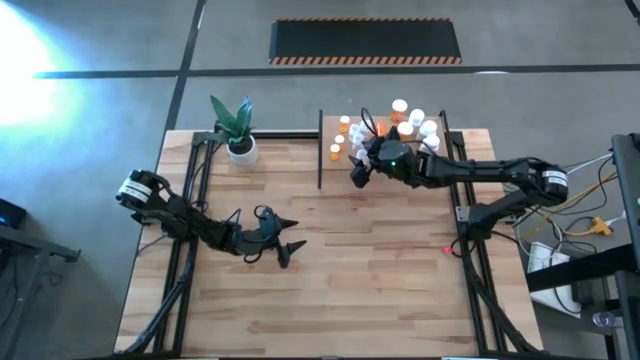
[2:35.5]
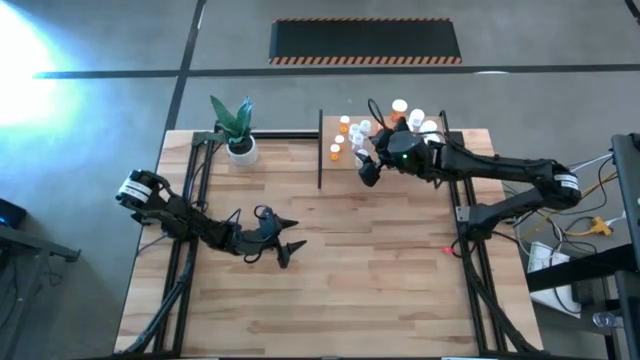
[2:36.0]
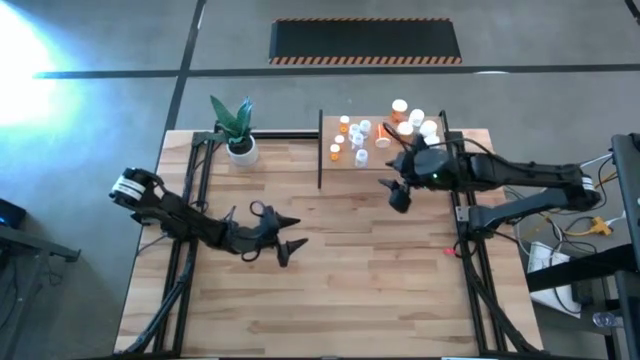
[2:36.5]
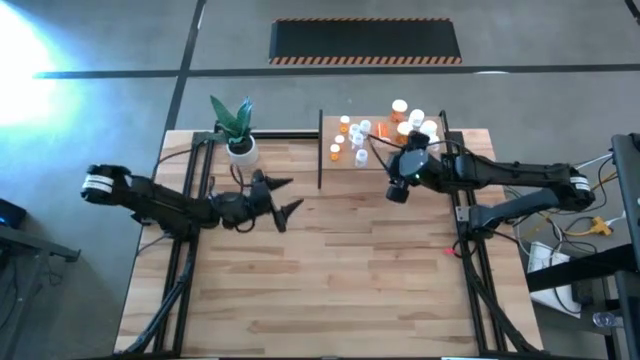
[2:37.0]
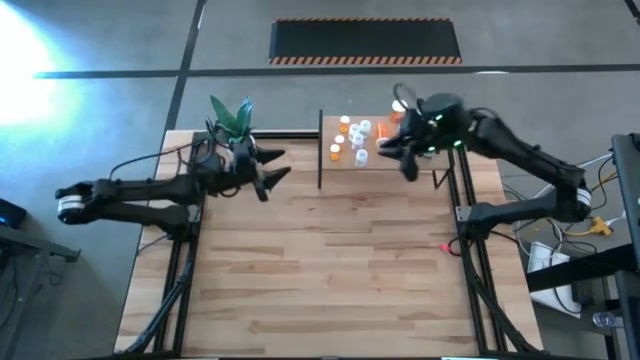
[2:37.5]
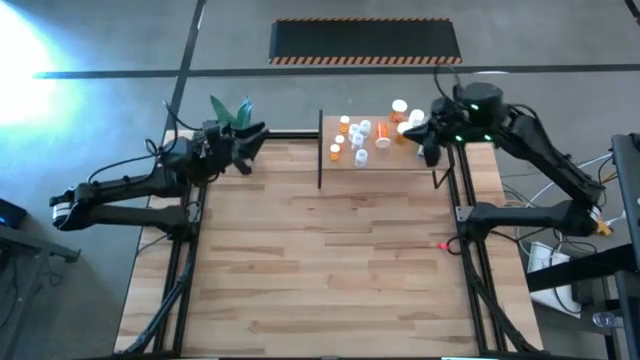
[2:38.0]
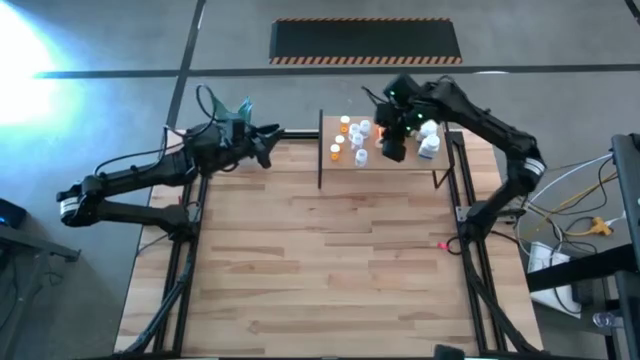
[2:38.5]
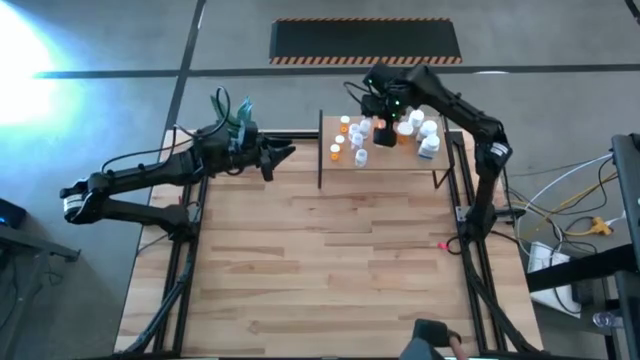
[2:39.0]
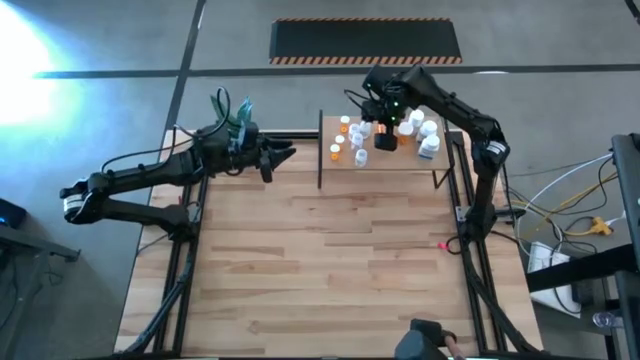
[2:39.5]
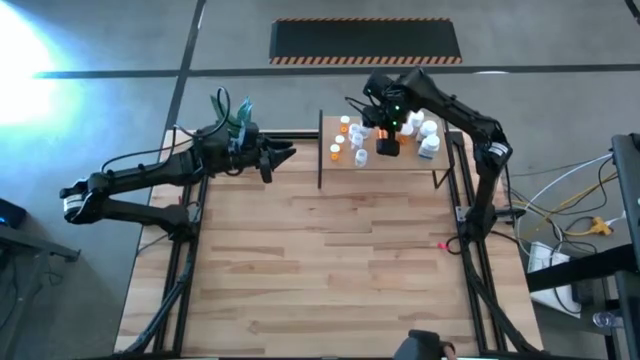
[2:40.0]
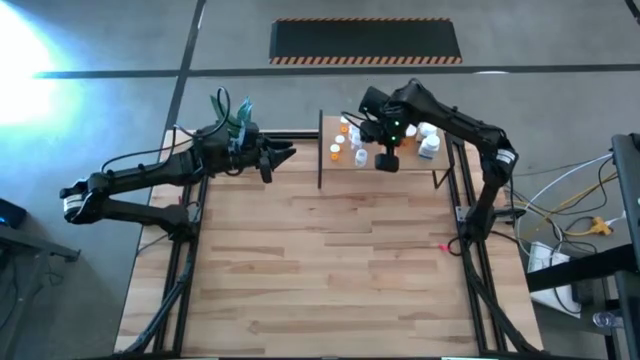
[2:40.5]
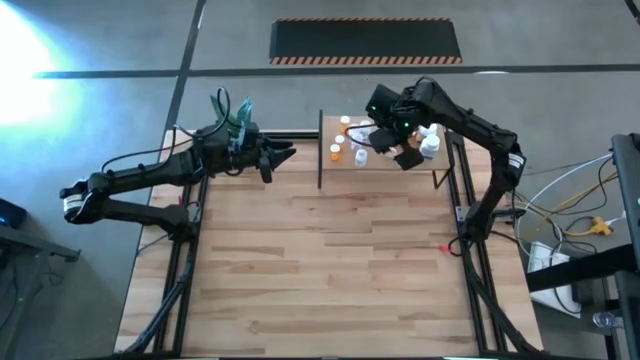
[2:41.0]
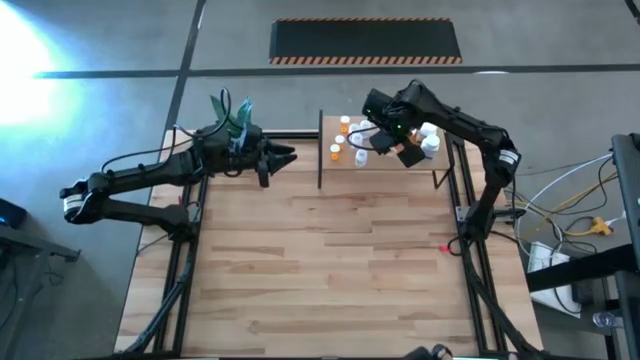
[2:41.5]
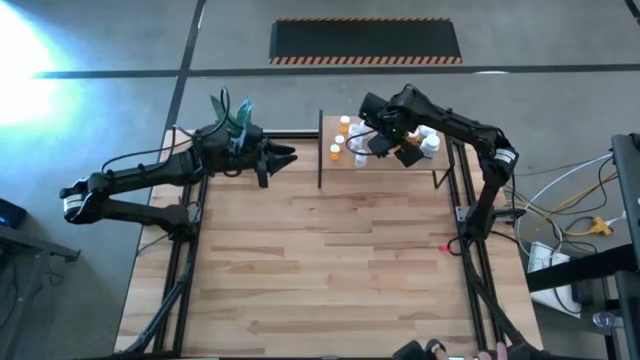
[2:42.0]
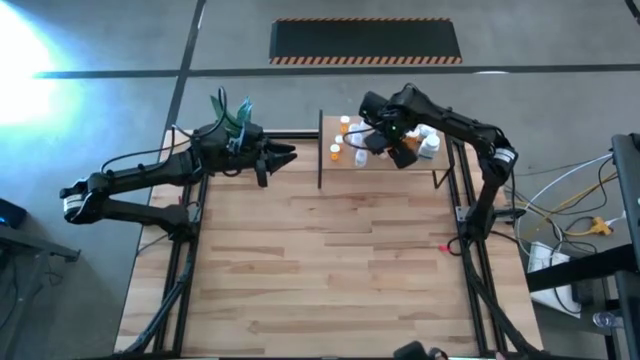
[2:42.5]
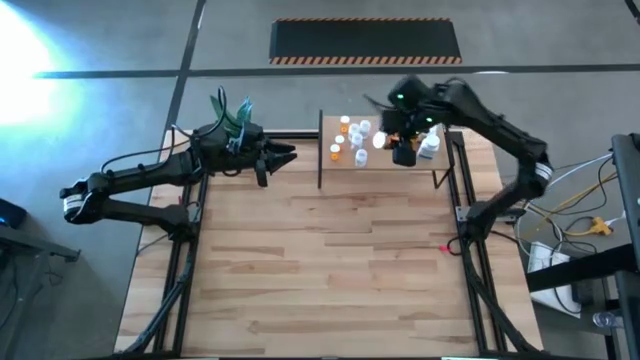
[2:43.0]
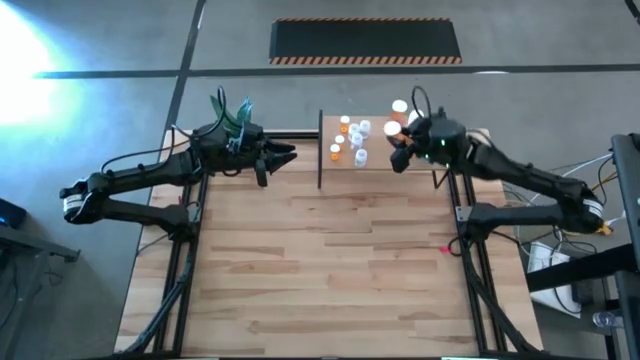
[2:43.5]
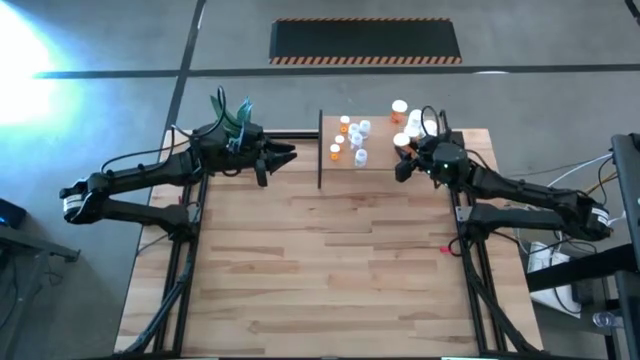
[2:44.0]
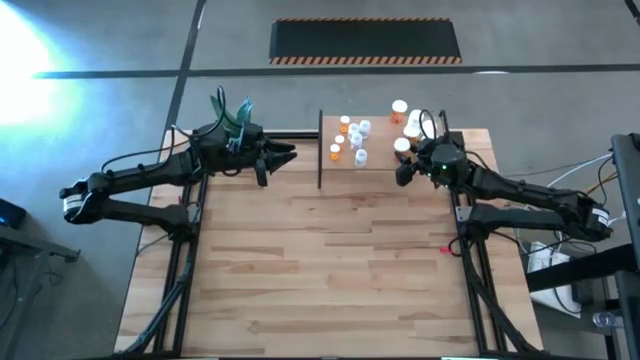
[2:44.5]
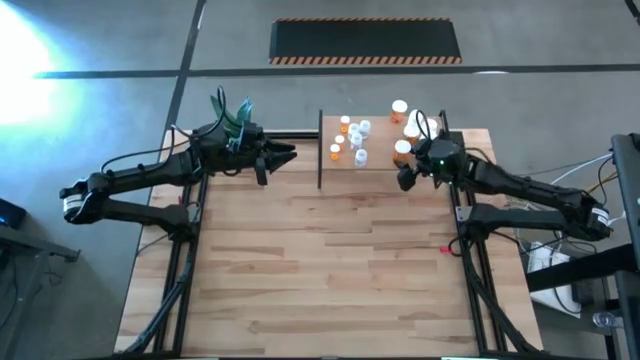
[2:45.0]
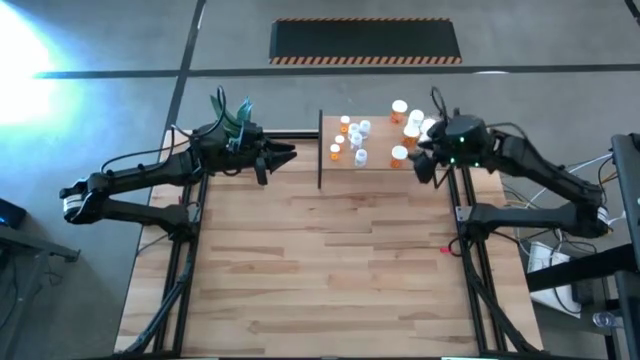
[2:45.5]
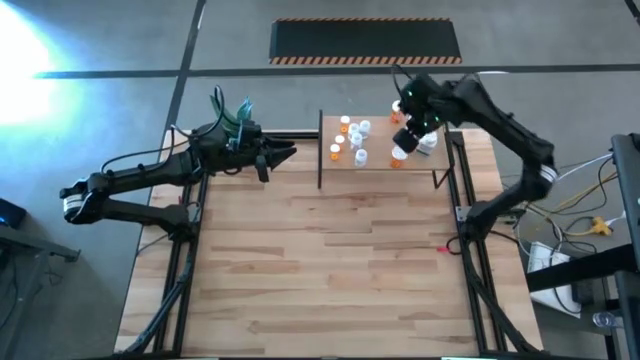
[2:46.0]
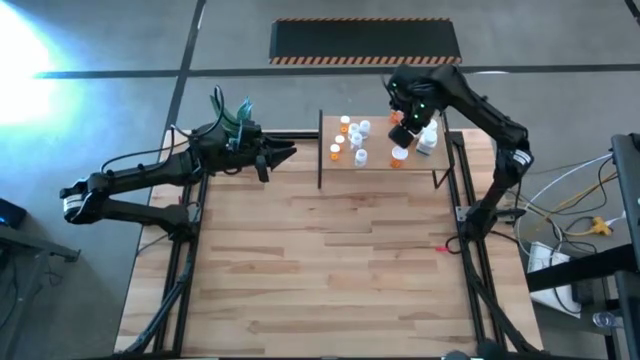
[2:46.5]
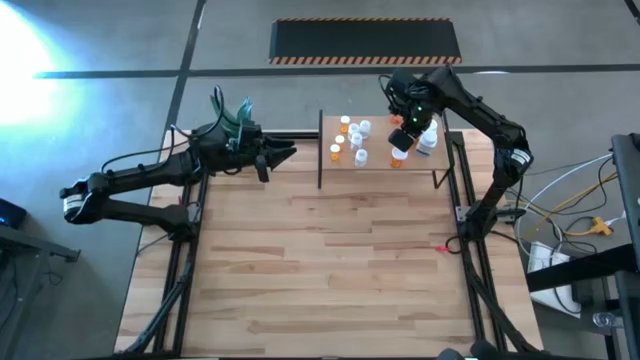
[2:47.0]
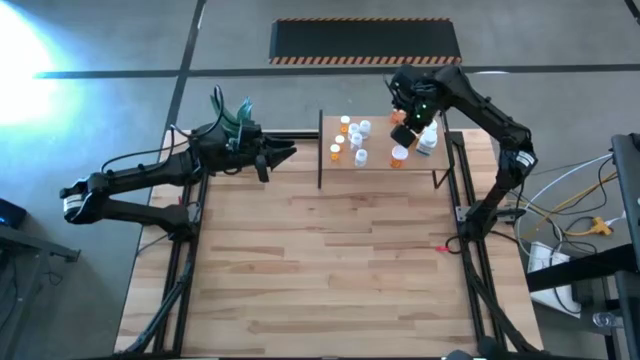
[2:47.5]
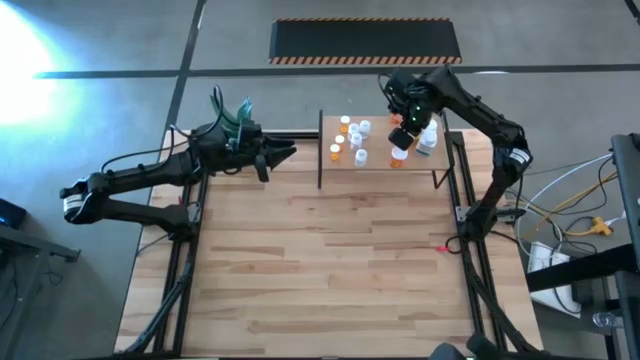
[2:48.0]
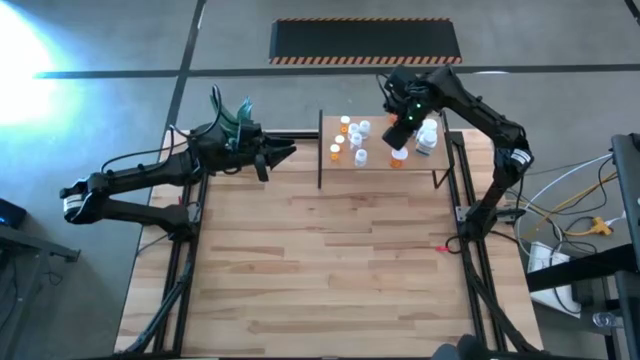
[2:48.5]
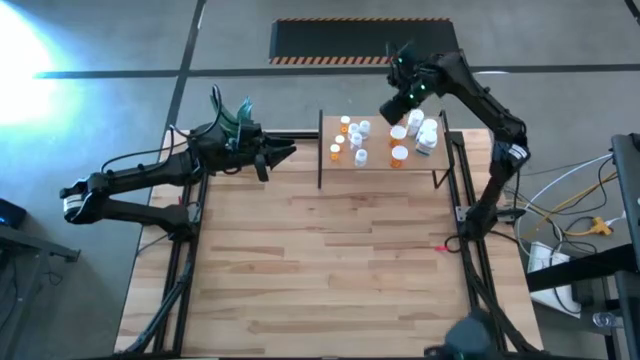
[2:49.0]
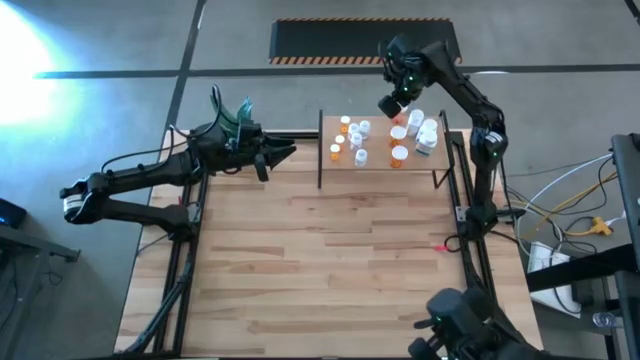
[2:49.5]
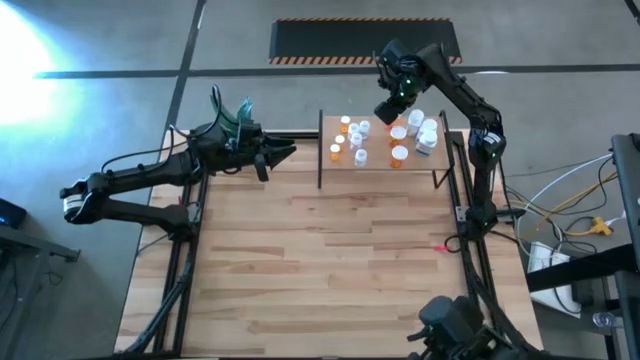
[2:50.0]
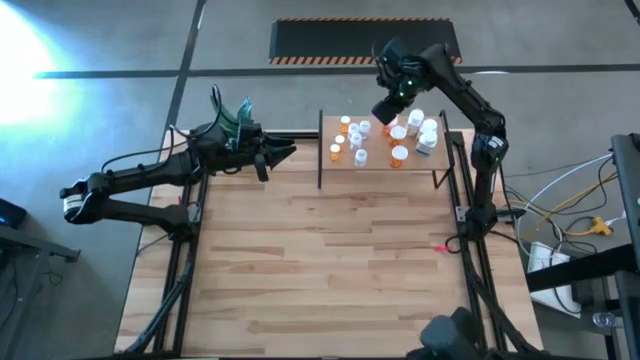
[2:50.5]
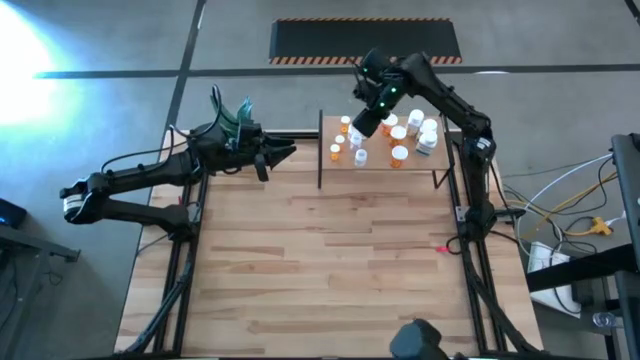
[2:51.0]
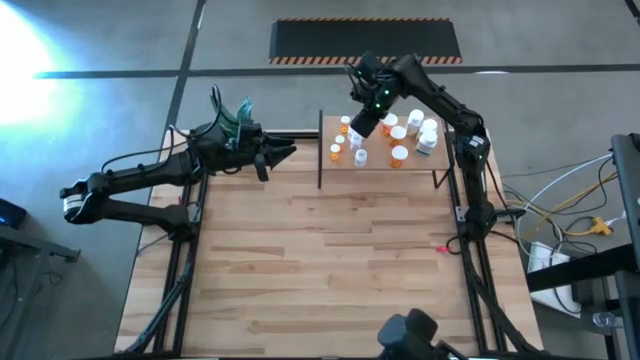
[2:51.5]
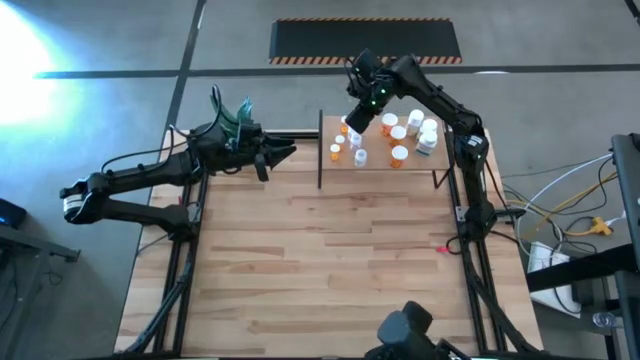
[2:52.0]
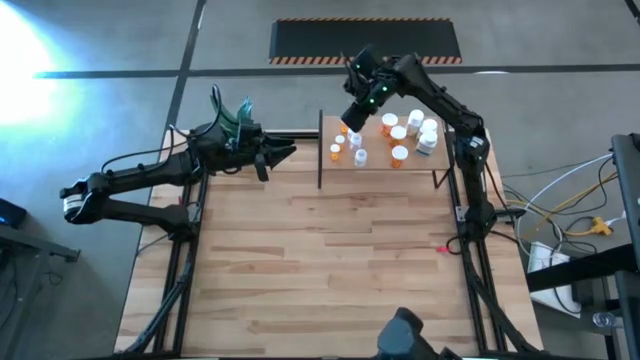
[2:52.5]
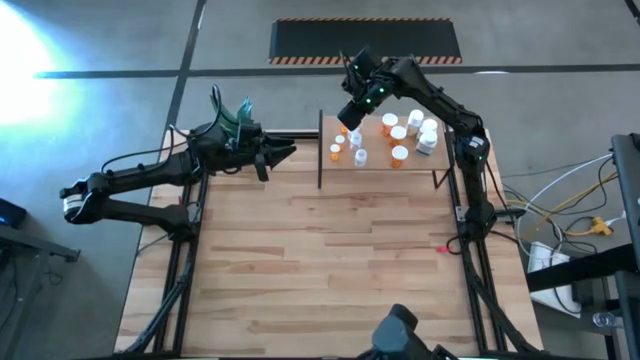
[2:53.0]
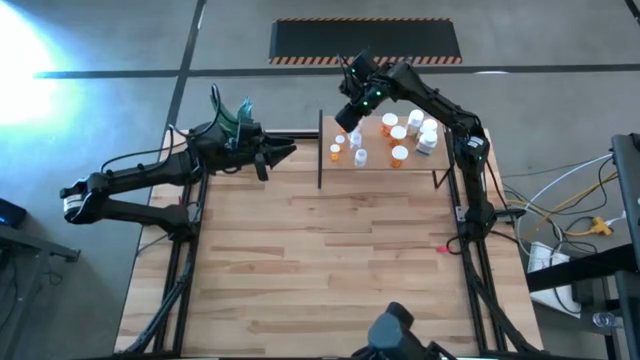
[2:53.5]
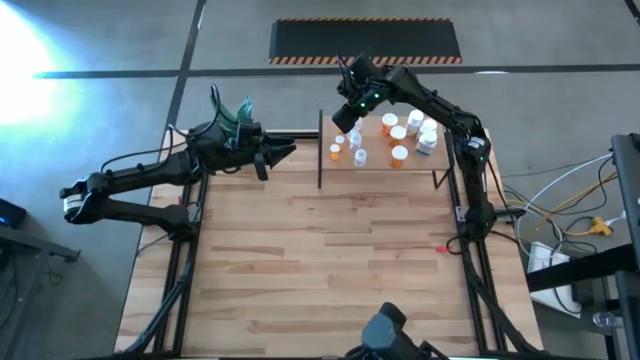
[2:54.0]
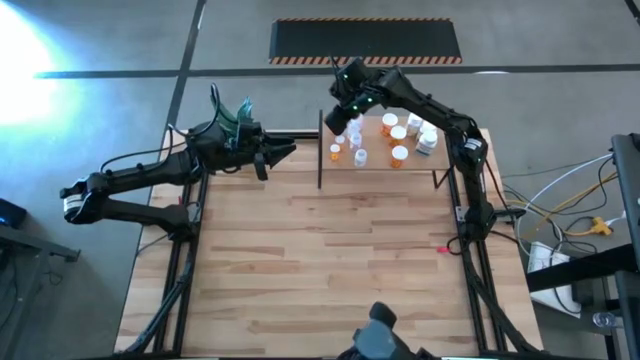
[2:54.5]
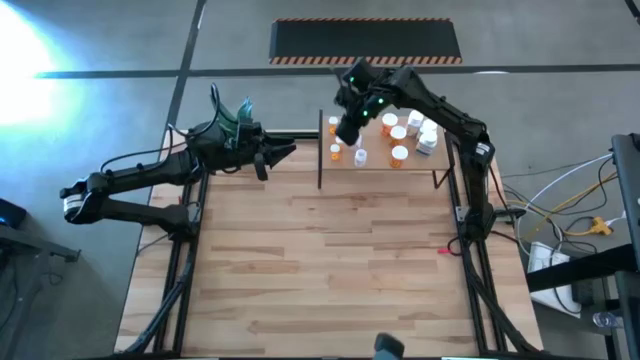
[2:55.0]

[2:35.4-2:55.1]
Task: Pick and place medicine bottles onto shelf by color
Adjust the pill bottles on the shelf
